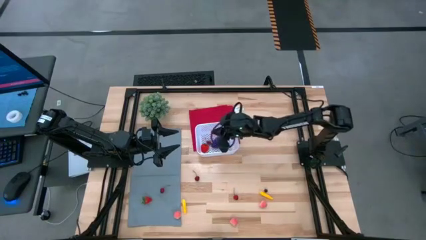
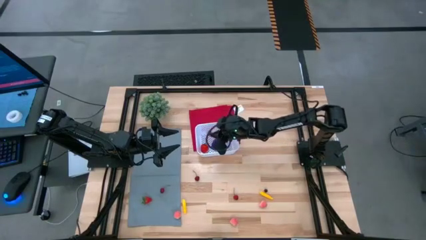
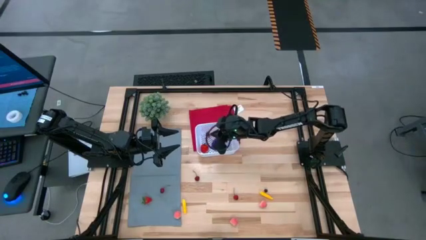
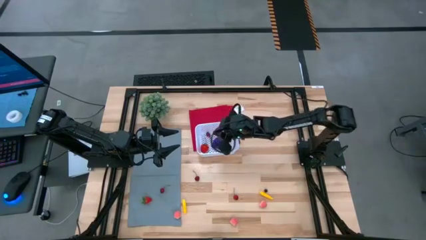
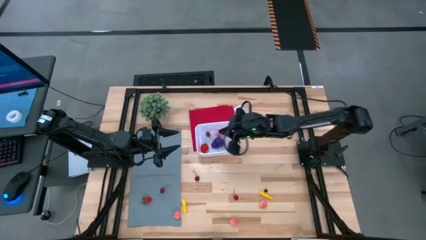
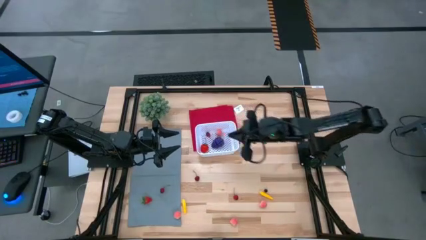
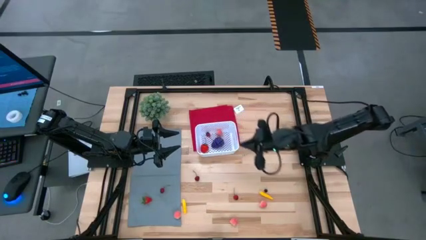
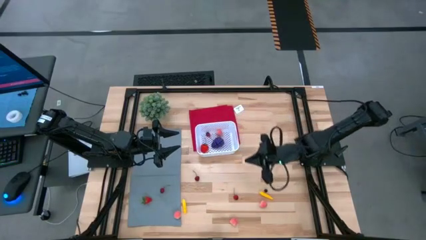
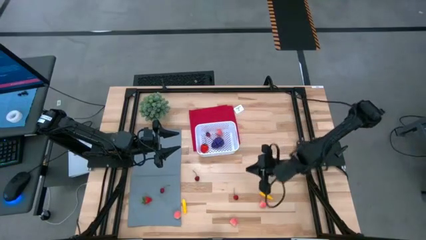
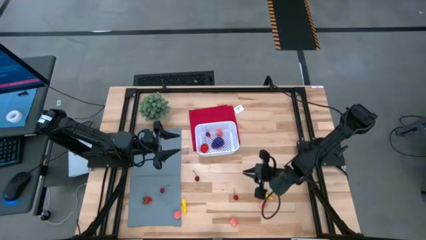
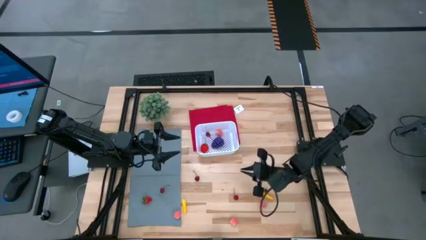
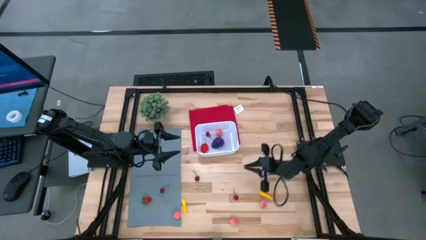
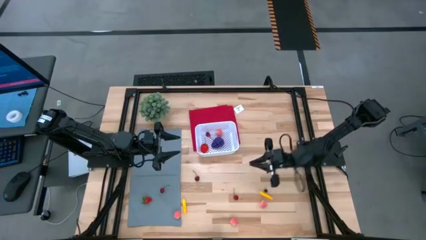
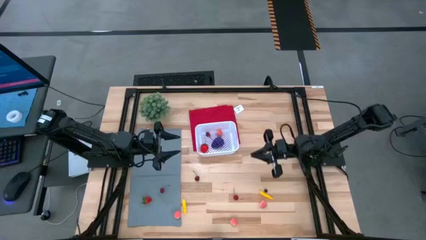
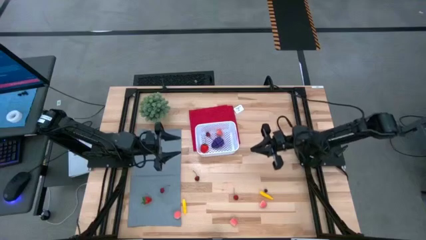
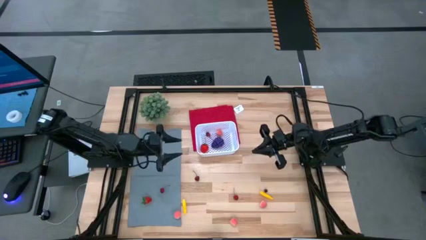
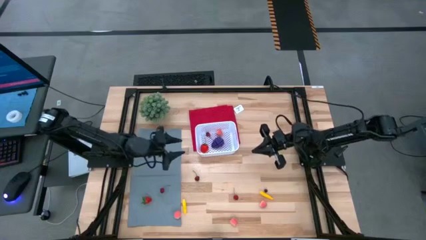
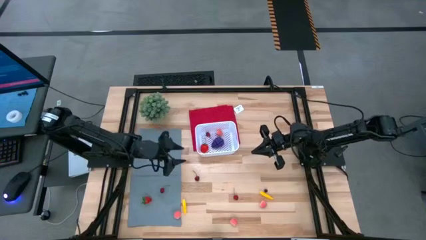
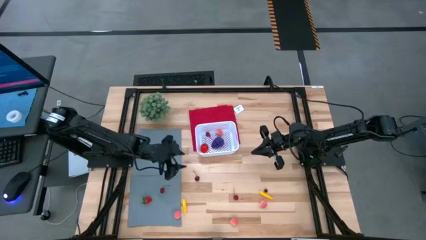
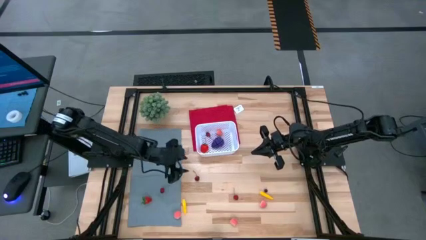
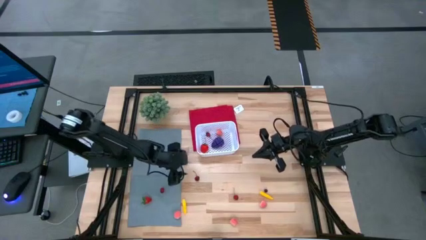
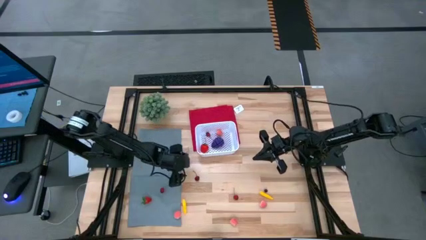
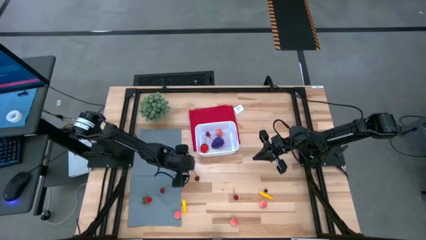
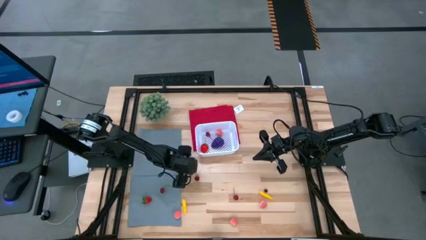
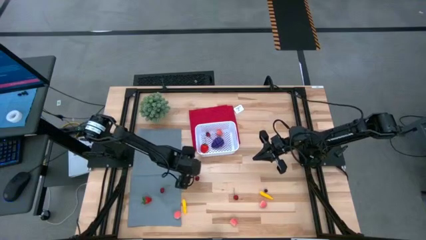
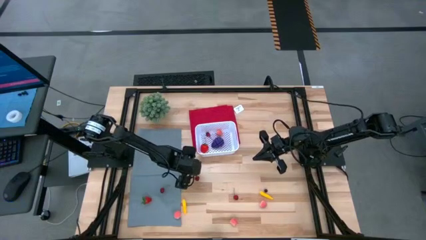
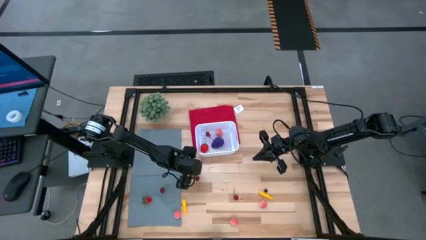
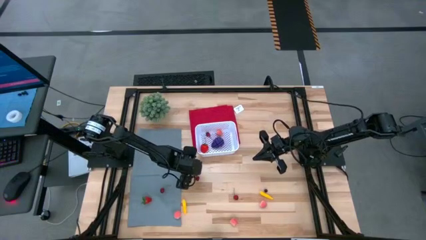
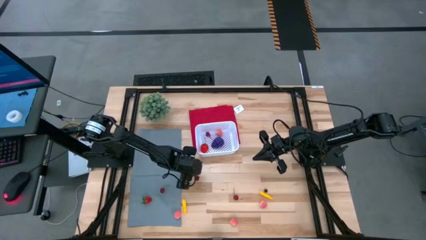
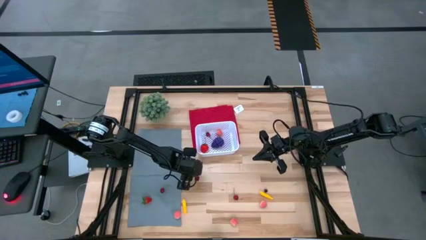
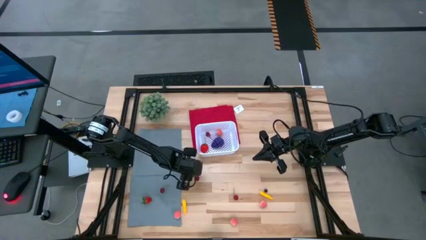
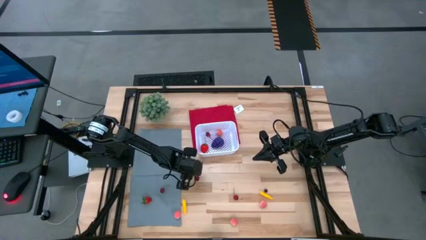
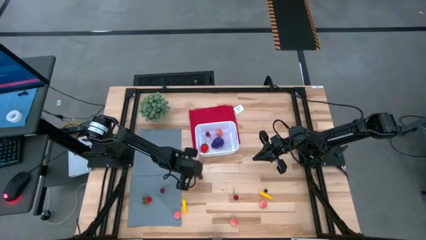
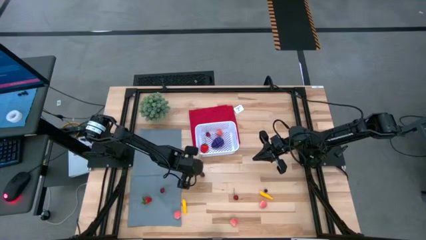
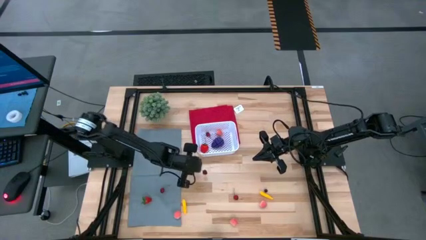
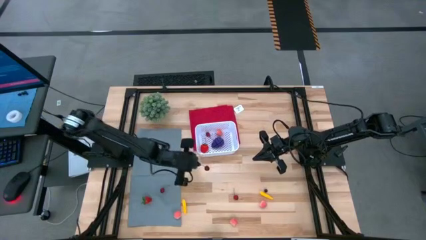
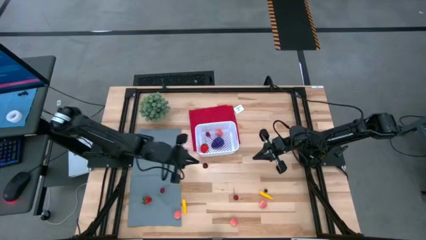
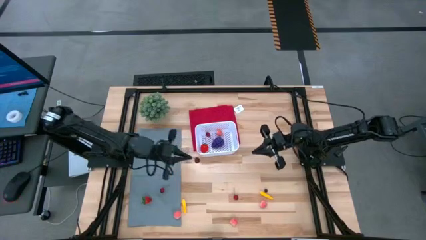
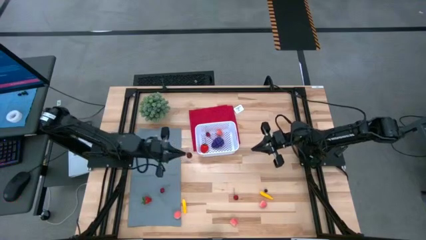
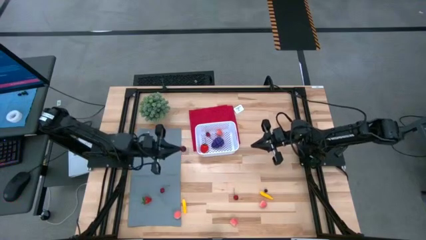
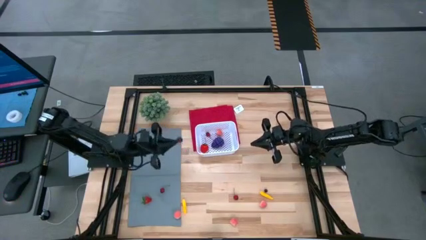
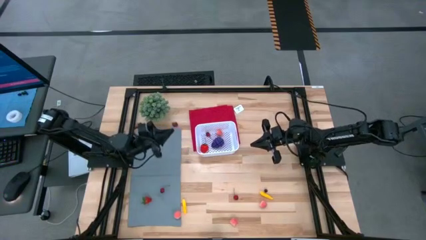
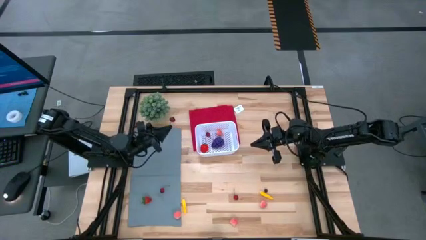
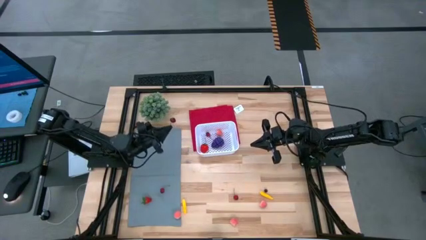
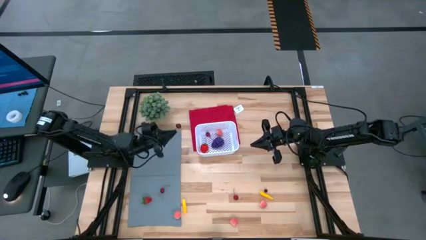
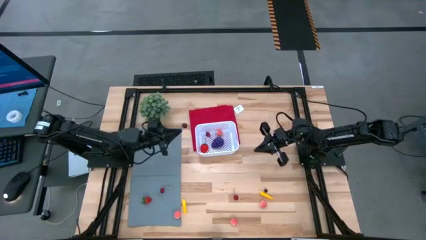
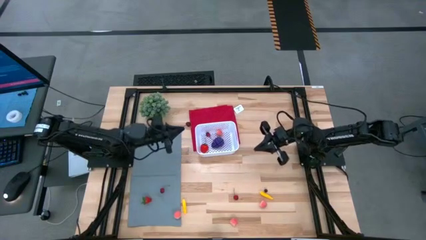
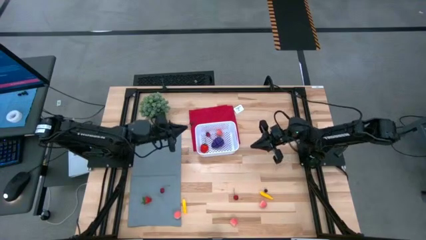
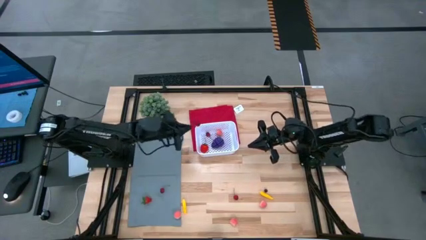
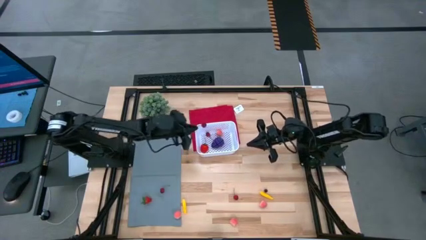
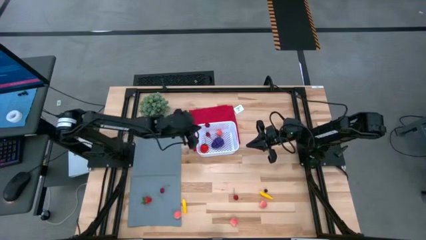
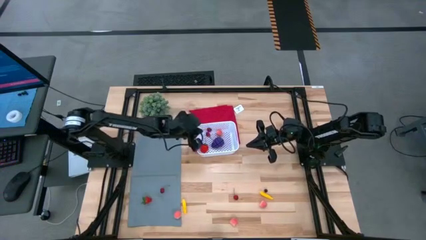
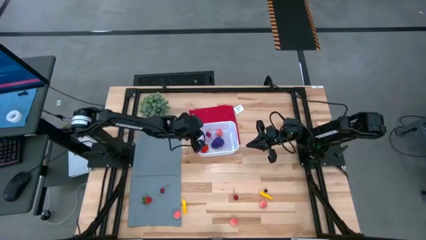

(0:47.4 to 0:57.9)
Task: Pick and placing Produce into tupperware
Put the red right cherry into the white bin
